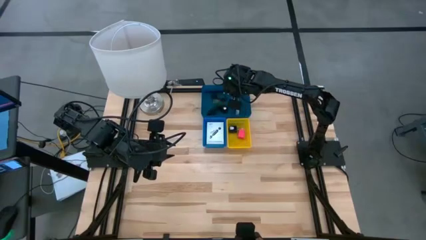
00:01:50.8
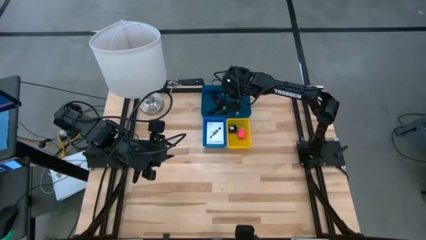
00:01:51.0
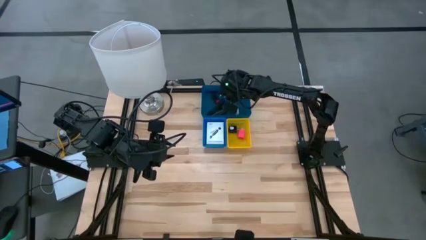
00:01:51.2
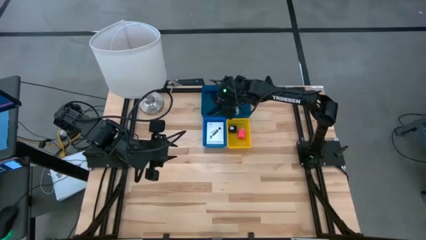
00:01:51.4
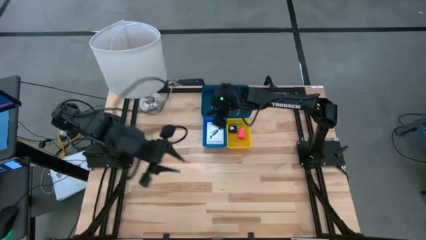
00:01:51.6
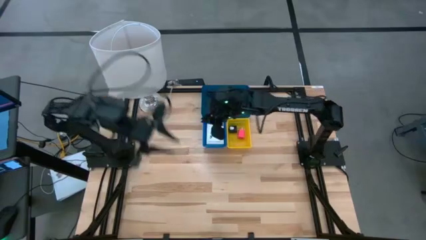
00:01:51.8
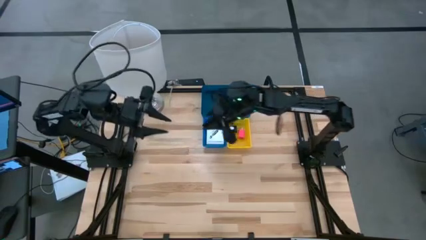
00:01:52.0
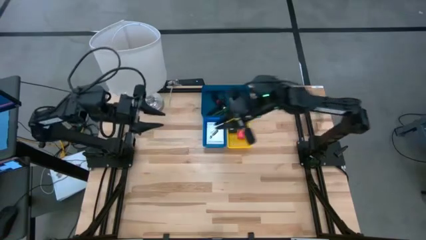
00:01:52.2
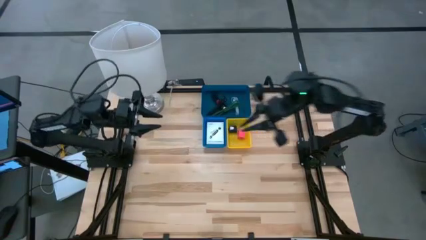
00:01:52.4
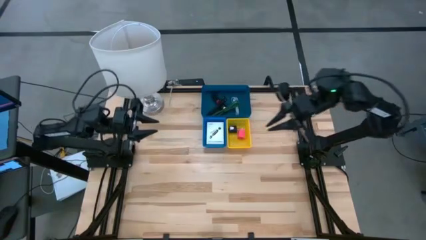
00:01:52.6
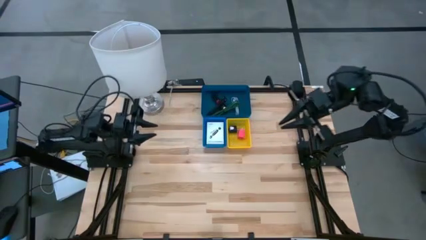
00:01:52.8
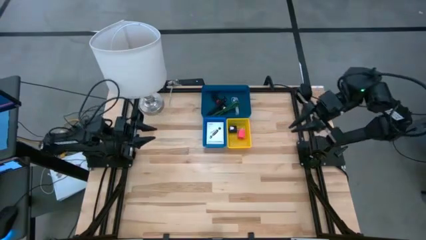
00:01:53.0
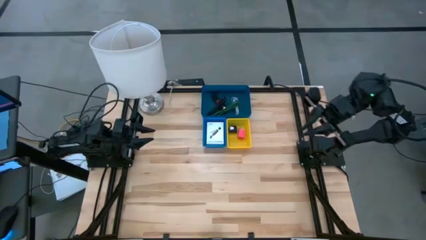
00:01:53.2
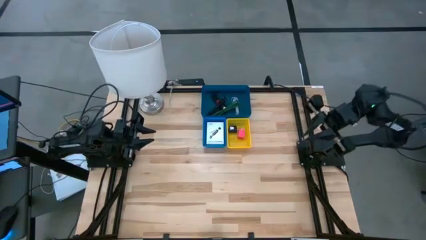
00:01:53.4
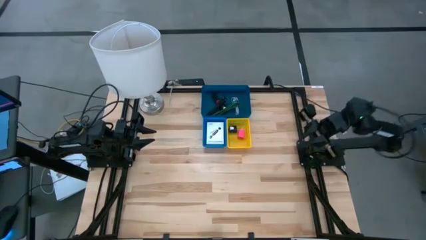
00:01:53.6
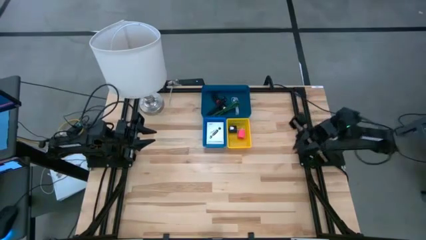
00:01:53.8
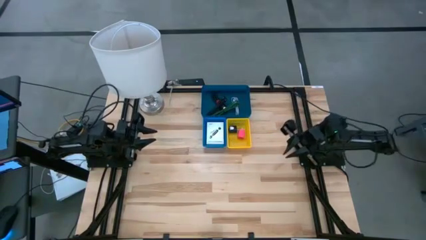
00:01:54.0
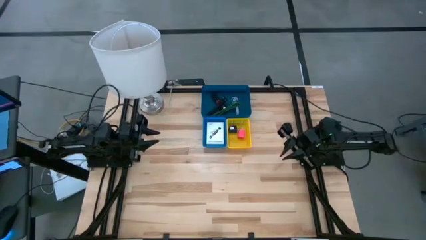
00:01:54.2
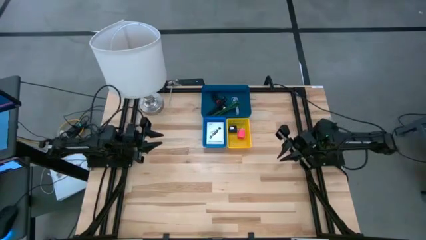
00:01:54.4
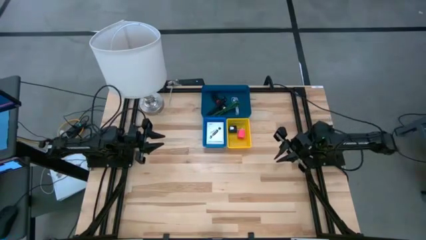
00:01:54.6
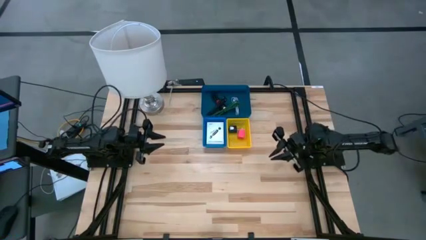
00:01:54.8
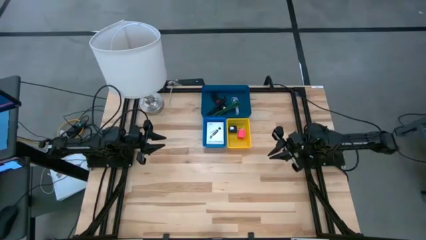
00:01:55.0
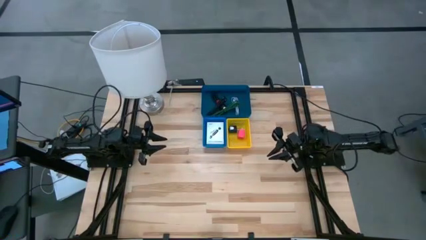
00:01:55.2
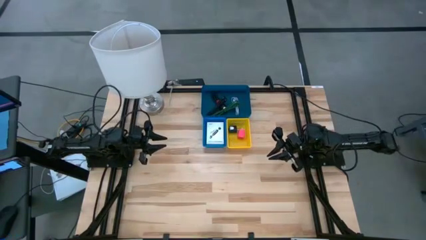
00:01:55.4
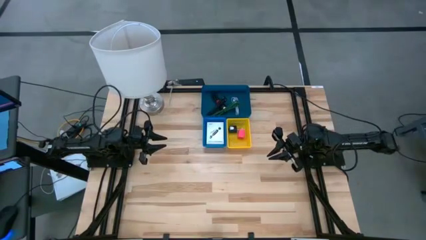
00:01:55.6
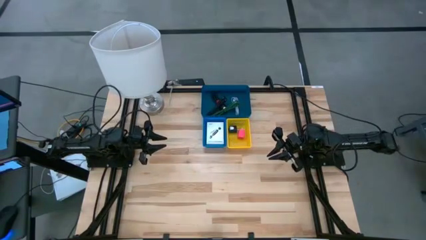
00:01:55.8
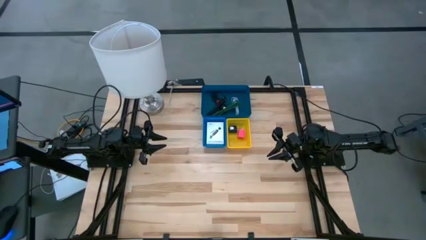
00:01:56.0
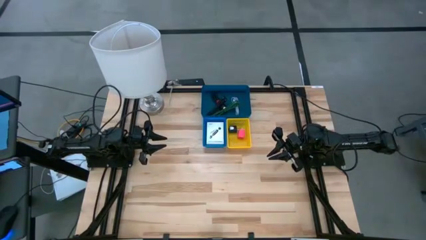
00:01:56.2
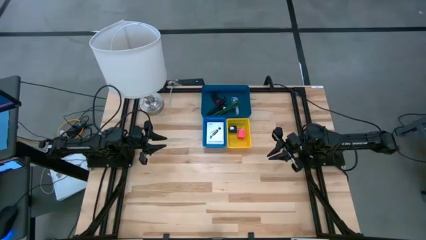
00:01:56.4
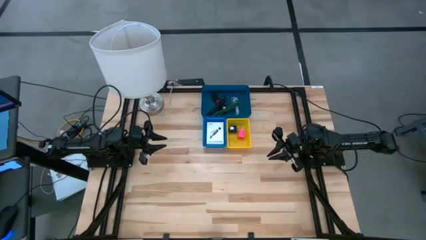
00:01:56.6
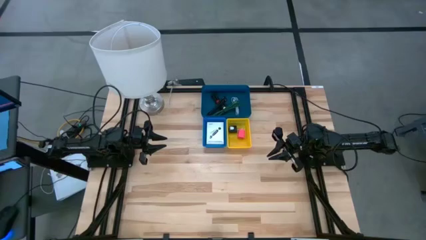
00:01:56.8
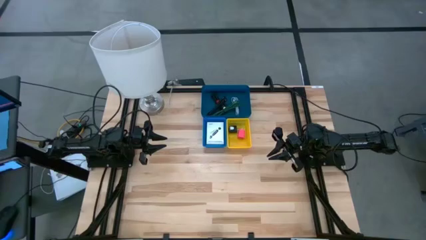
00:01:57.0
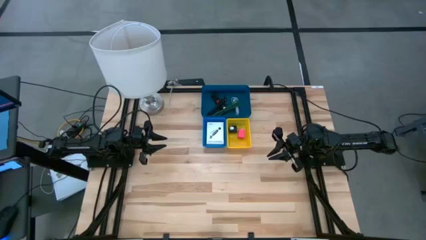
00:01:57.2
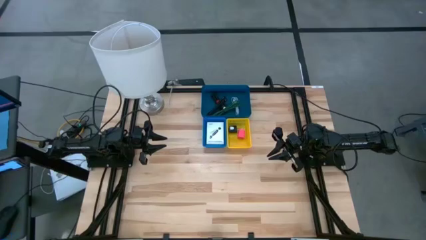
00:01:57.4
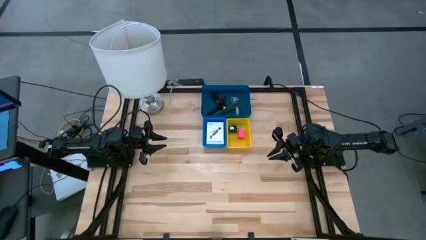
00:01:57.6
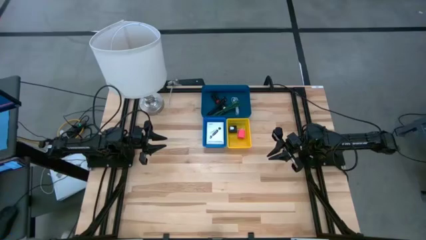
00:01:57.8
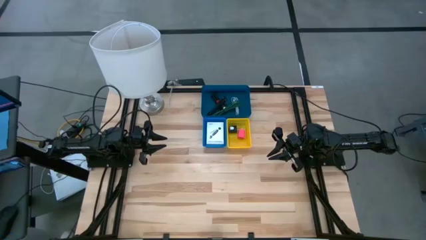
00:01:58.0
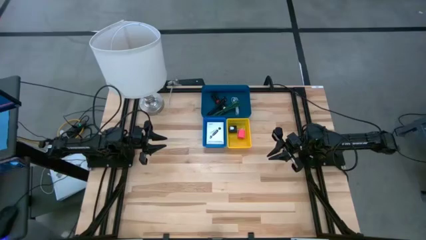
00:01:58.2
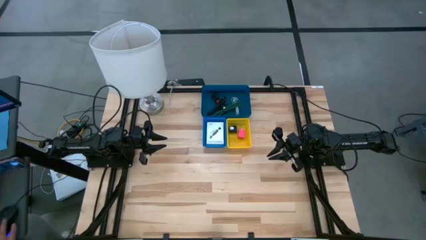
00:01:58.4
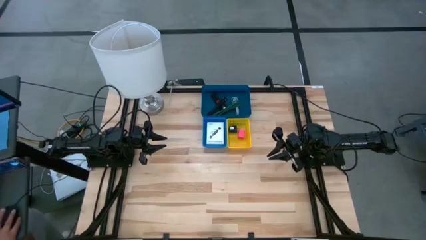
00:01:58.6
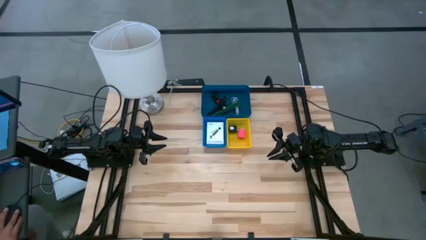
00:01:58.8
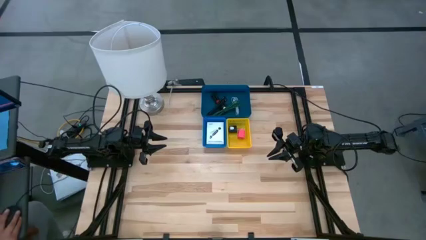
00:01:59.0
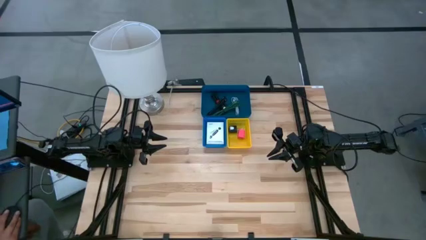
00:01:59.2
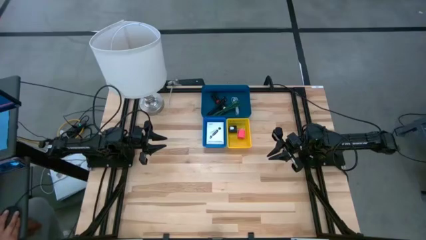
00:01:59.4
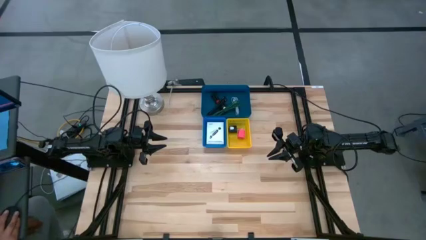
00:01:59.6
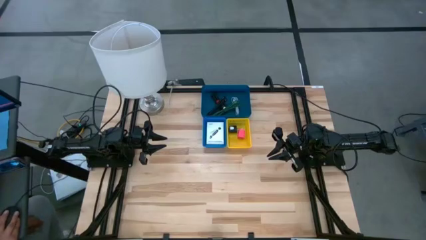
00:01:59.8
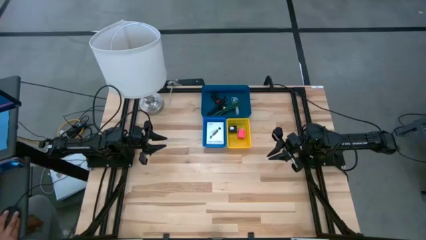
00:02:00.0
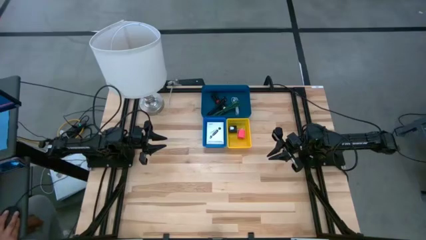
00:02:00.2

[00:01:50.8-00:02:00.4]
Task: Pick and place items into bin
Return to Home Position

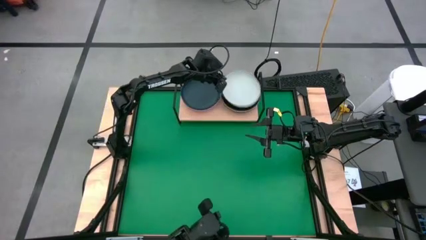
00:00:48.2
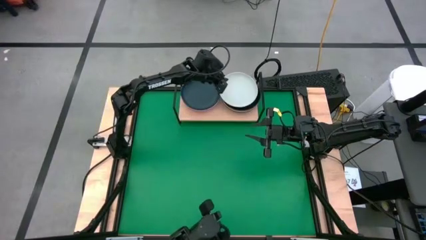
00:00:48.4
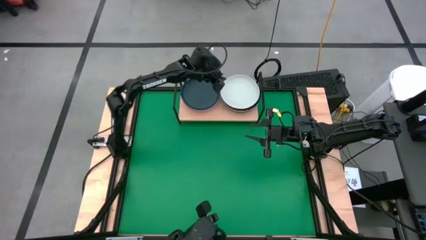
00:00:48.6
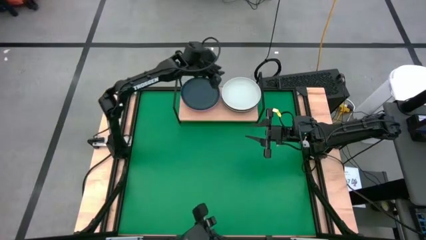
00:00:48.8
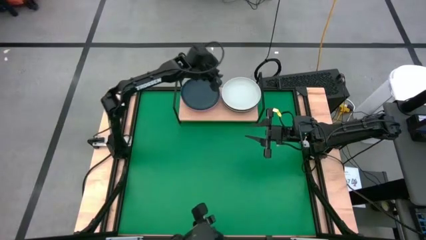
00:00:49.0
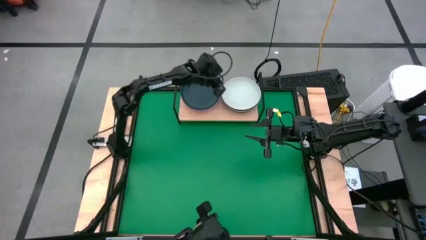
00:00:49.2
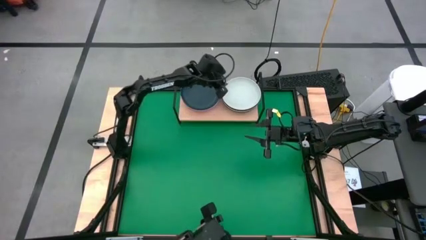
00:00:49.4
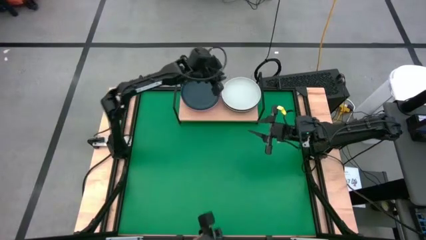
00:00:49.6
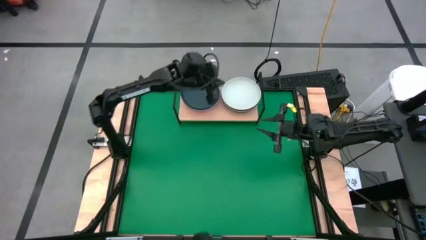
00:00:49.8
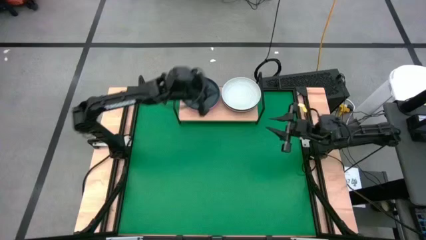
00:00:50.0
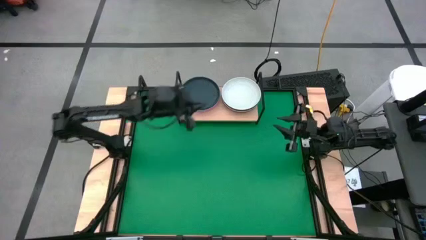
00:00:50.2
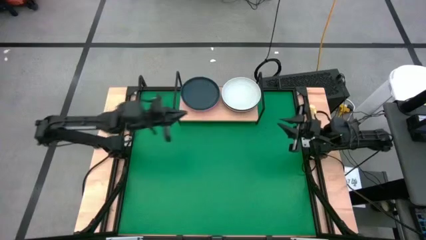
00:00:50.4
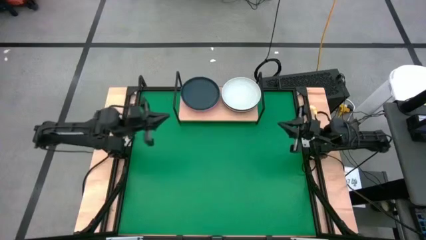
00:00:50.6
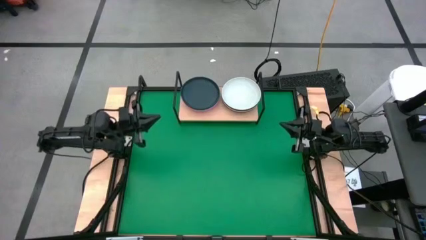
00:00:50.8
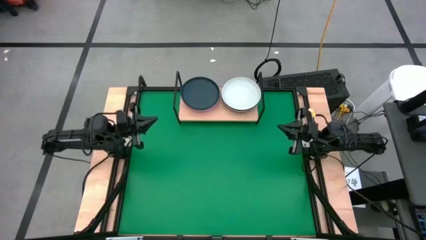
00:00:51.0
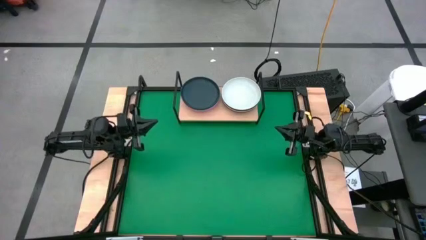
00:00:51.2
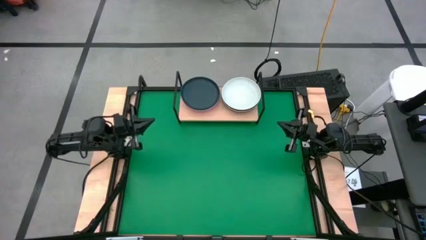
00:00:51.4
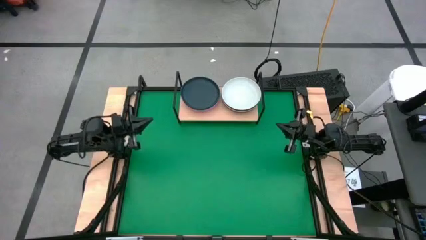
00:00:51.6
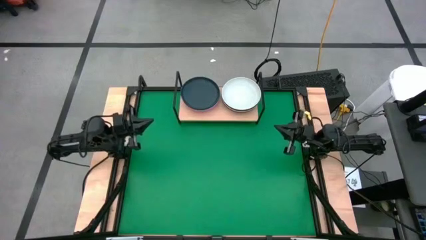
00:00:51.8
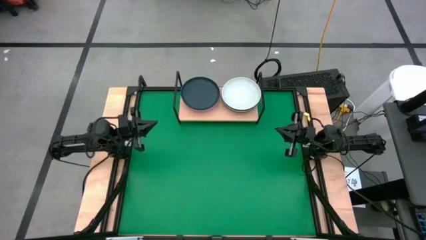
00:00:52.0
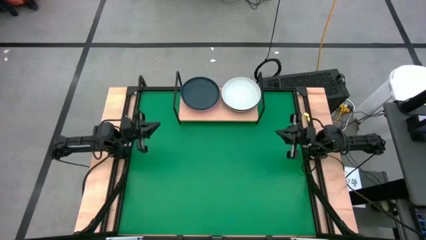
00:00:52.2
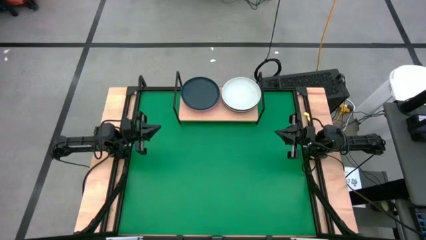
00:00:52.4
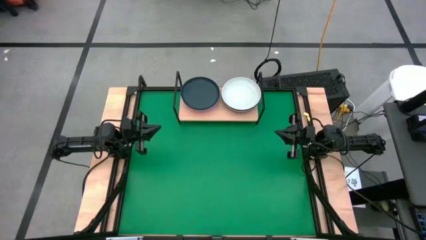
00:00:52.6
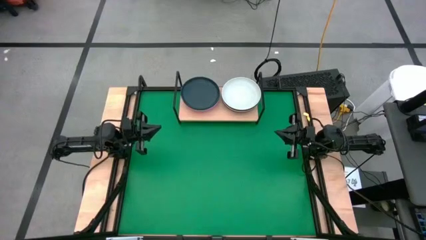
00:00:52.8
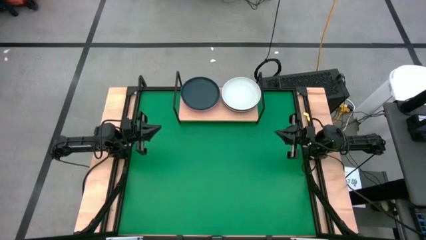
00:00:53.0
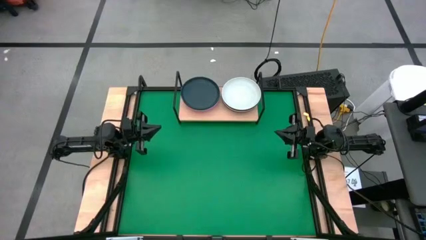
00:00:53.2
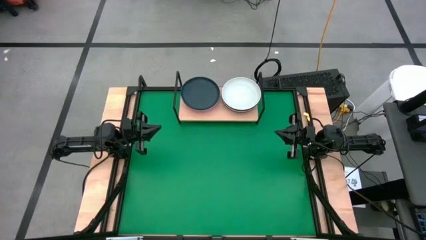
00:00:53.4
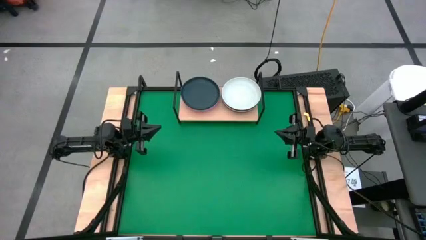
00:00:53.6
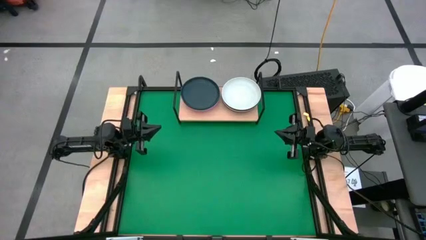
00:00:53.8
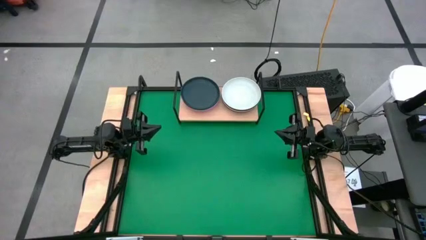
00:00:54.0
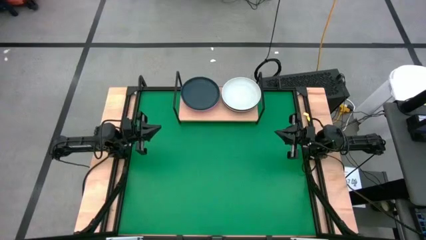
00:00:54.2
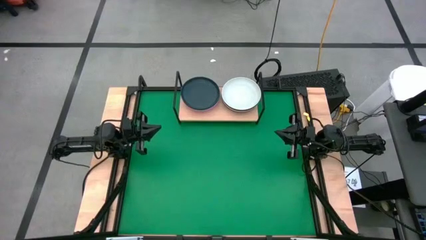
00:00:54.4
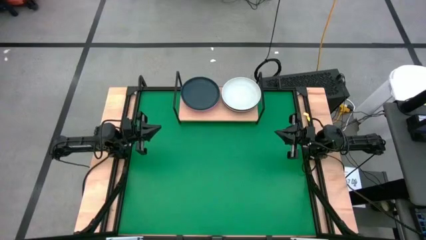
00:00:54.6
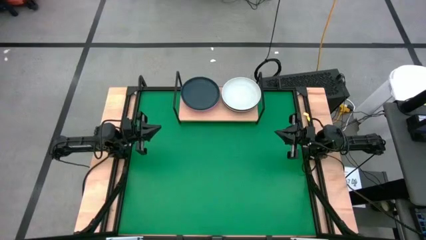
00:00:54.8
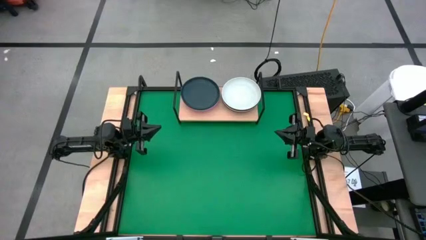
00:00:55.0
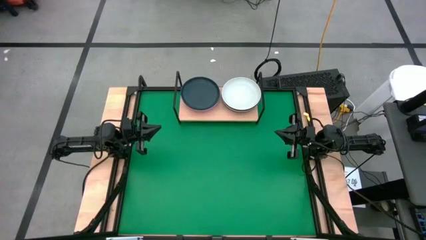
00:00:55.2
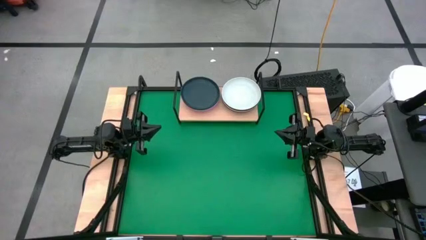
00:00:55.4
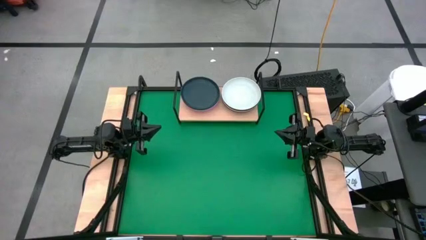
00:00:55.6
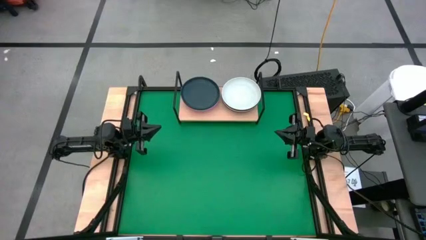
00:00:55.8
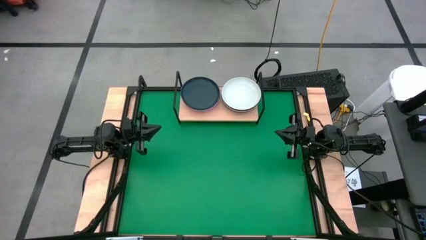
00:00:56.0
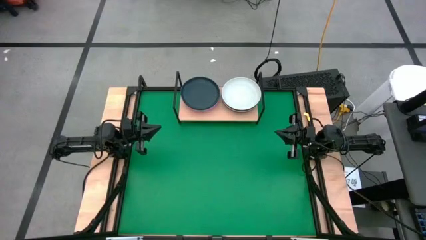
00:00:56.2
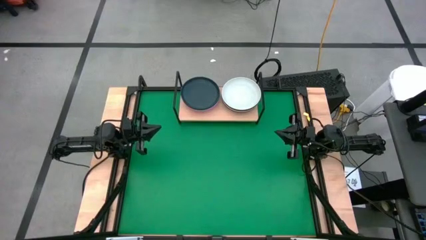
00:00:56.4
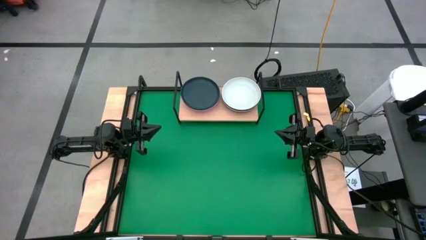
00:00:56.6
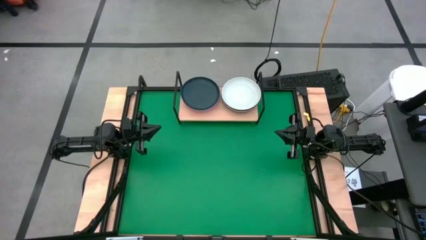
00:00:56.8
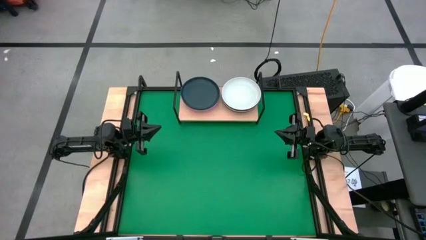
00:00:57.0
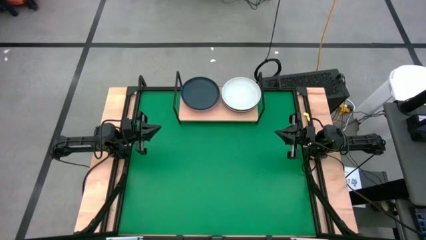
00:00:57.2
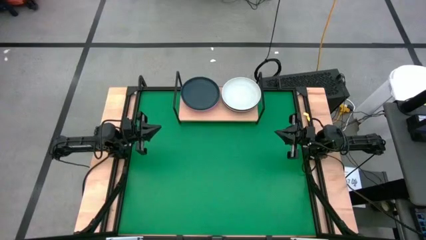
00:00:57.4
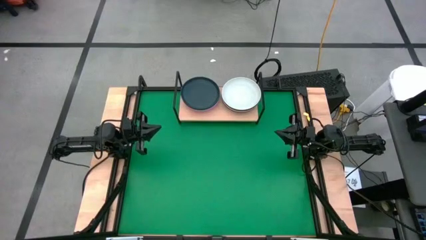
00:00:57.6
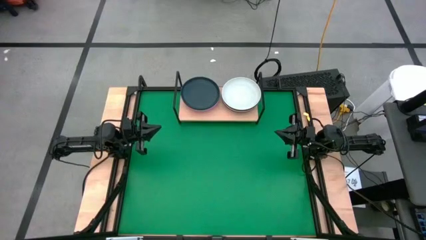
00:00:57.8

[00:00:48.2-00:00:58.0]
Task: Place and stack plates onto a shelf
Return to Home Position
